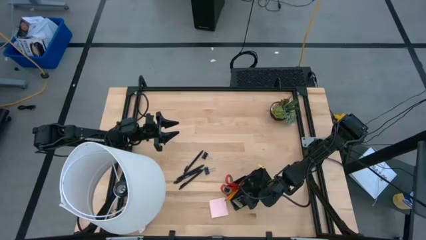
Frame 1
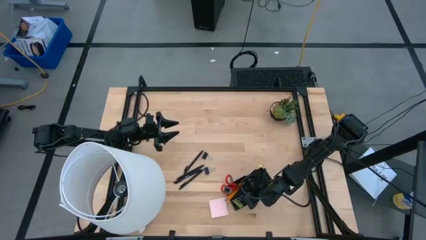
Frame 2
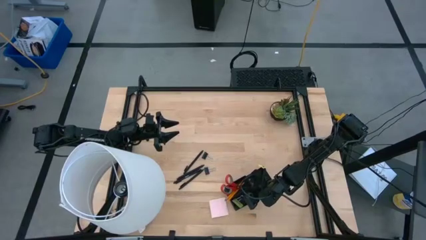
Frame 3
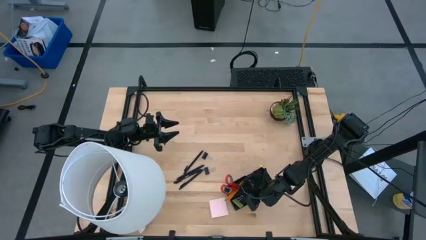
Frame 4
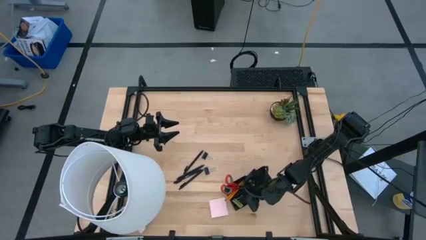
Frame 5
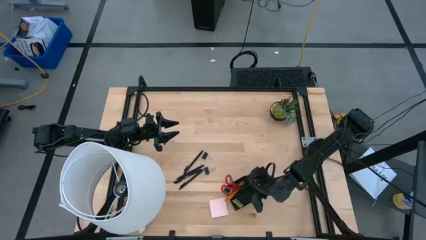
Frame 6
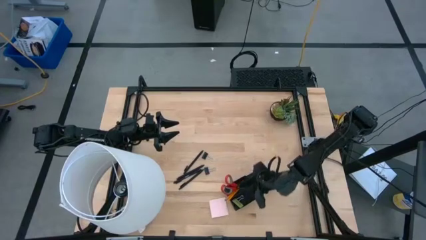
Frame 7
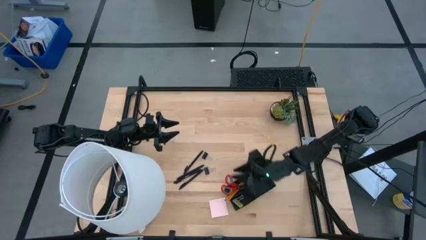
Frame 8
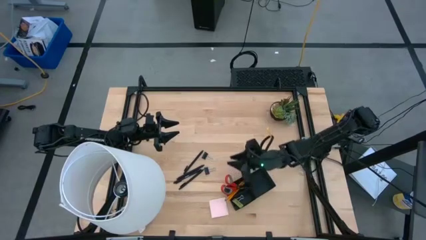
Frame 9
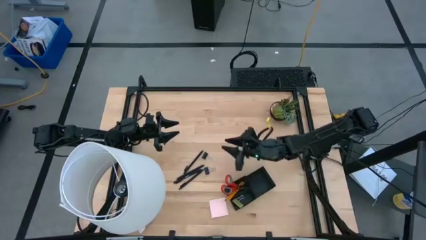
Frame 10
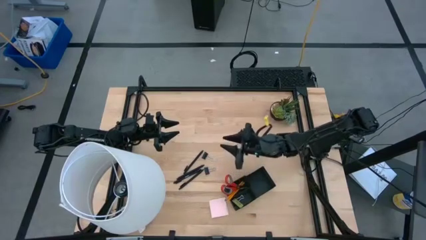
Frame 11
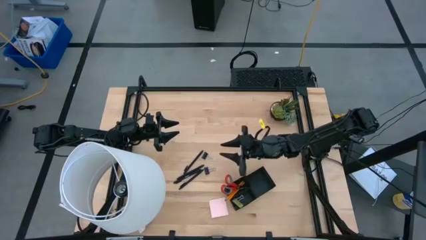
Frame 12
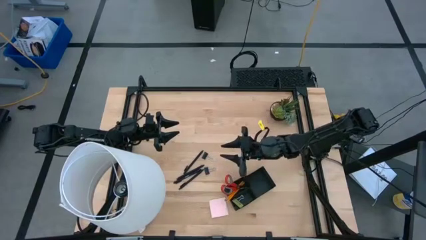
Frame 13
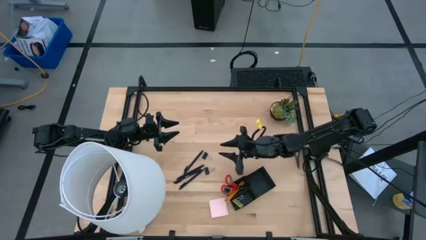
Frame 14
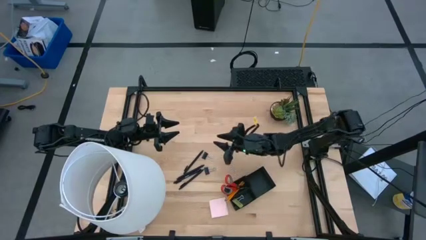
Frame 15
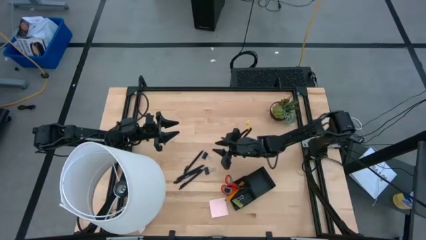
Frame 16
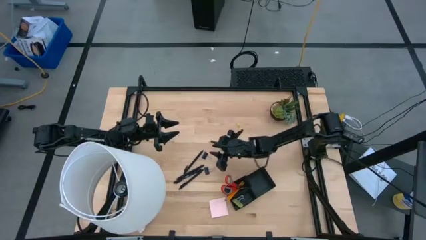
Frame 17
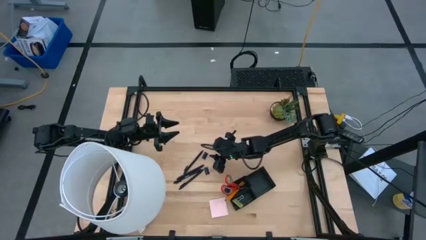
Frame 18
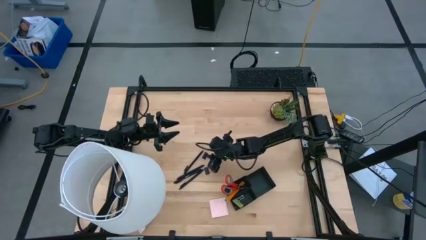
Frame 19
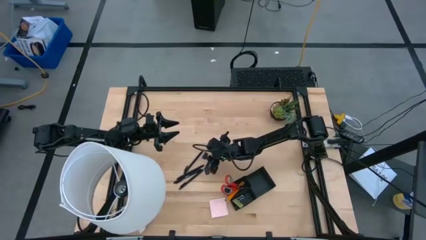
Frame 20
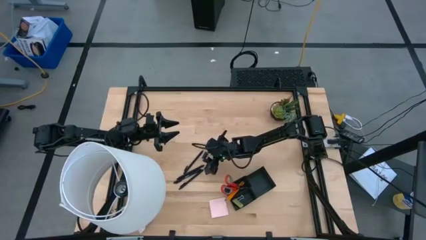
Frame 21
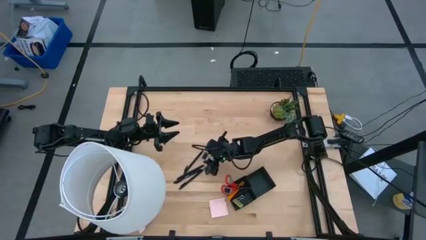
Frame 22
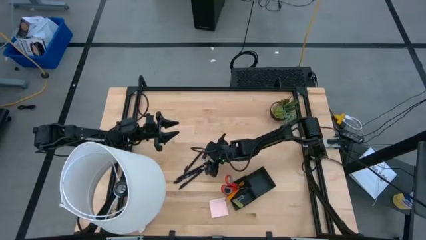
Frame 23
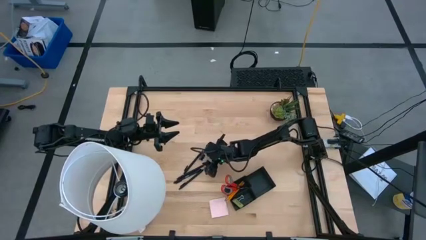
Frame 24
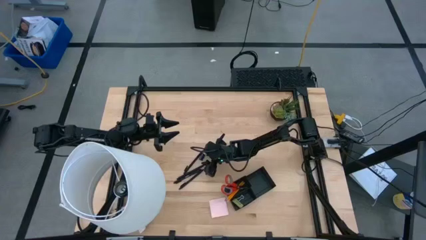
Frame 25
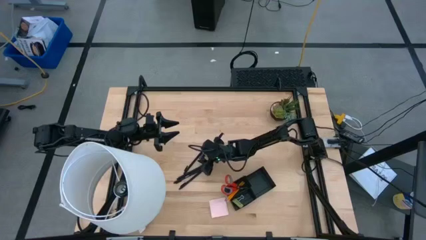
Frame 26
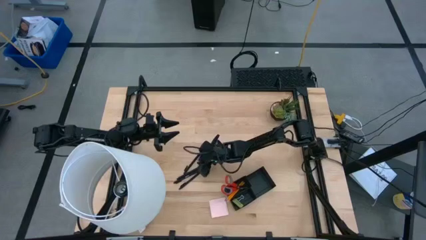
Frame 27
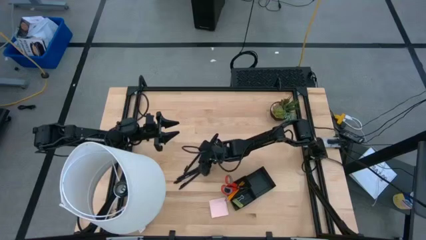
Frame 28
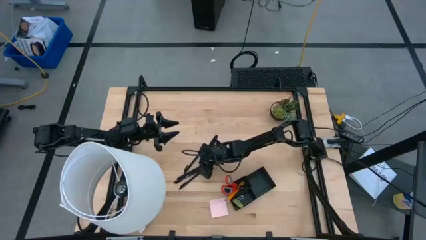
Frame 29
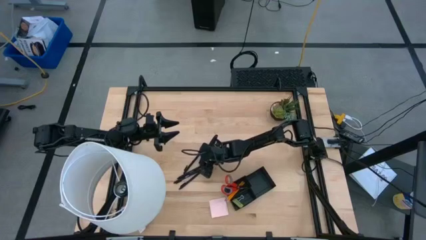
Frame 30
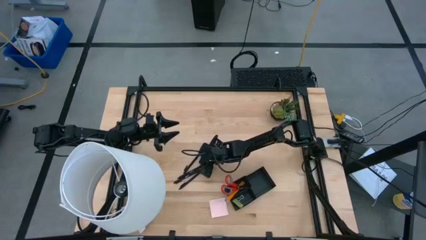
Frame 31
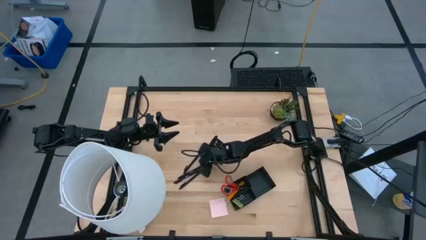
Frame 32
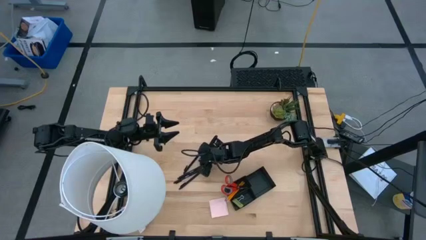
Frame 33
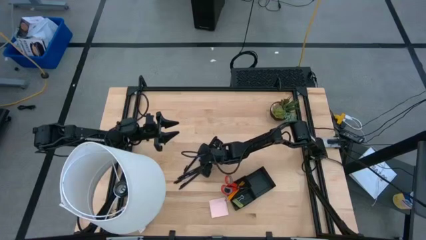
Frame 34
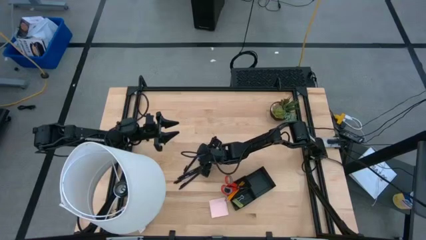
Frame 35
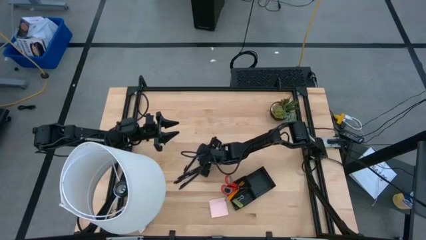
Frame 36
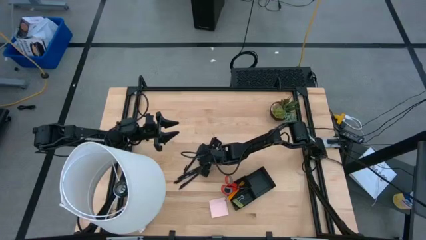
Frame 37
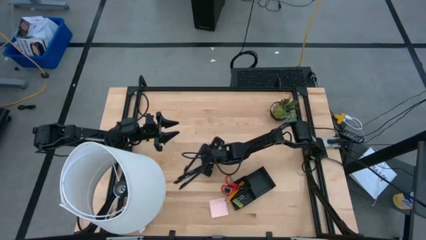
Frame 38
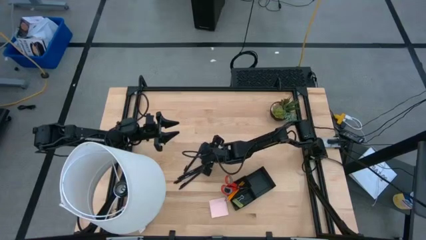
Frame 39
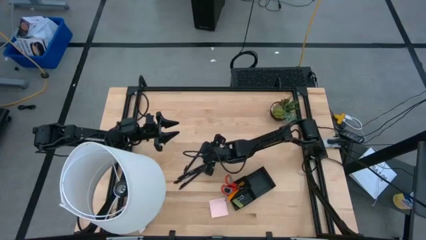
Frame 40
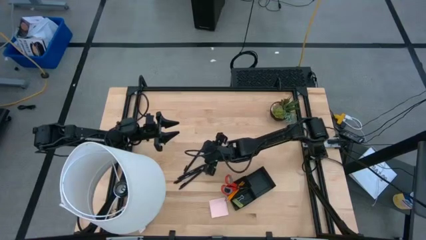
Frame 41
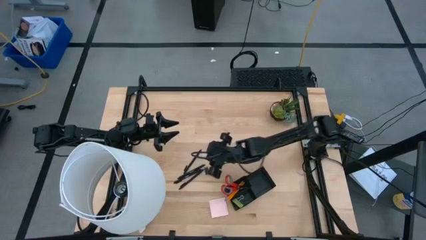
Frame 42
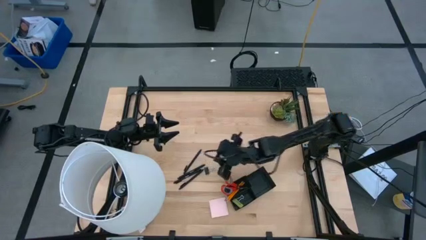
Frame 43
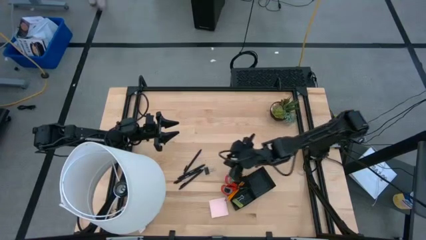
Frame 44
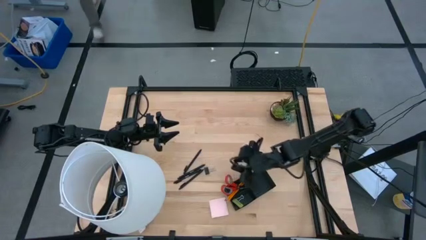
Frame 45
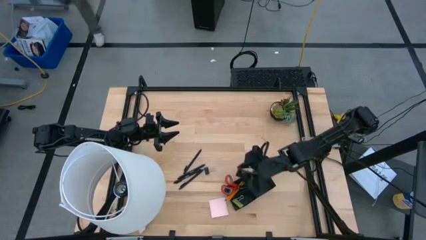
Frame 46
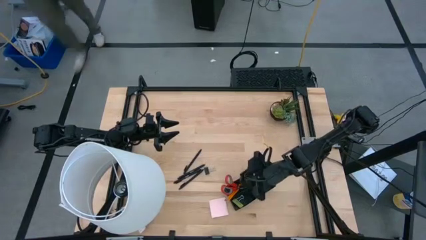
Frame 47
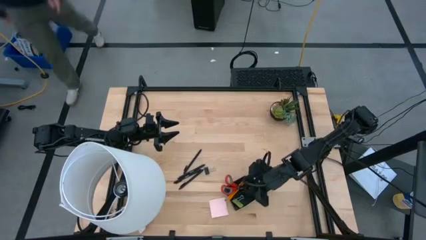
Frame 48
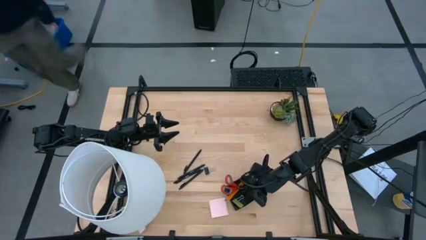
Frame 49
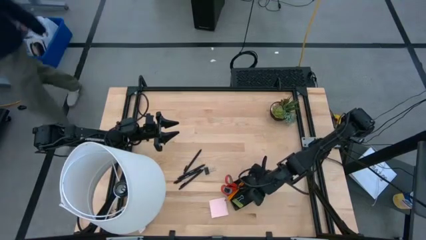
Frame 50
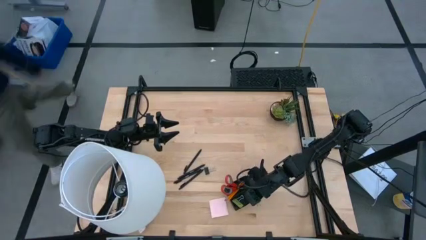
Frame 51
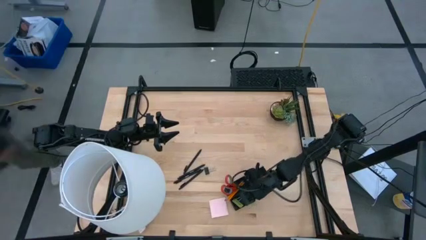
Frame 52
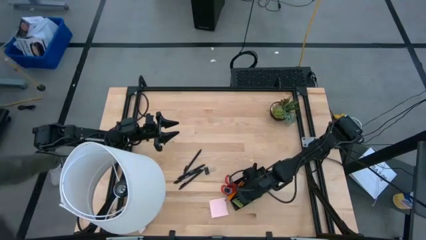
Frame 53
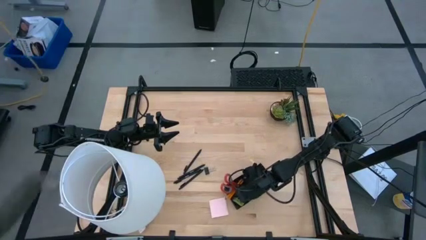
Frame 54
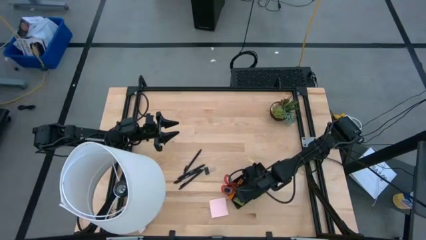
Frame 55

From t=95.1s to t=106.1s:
Task: Pick and place office supplies into organizer
Put the black binder clip into the black desk organizer

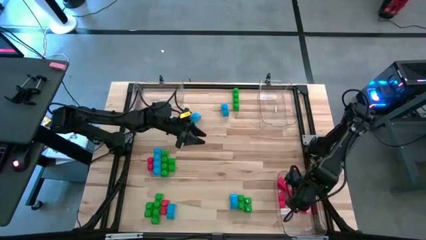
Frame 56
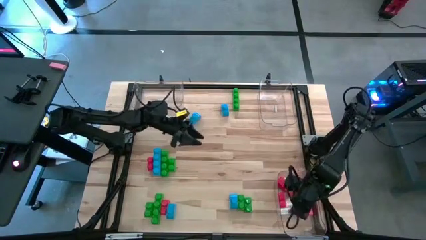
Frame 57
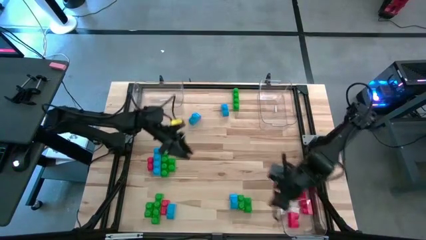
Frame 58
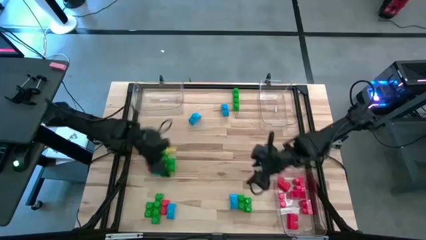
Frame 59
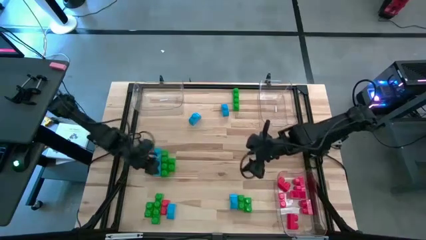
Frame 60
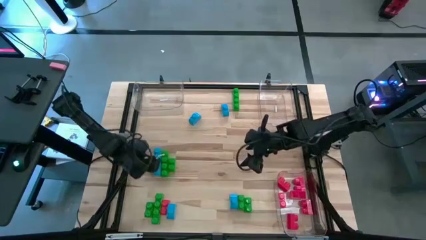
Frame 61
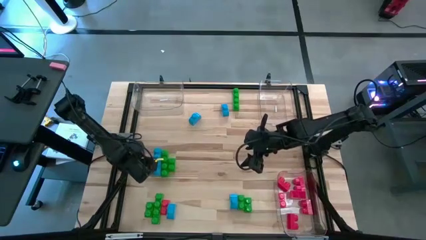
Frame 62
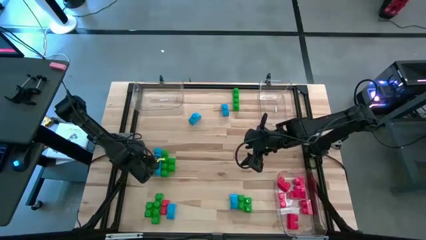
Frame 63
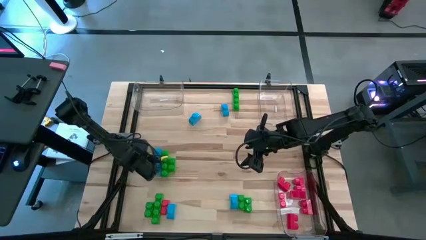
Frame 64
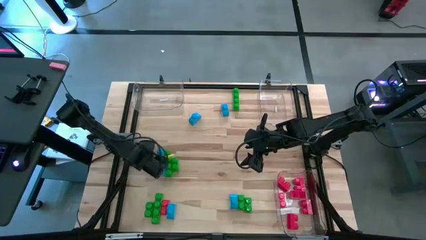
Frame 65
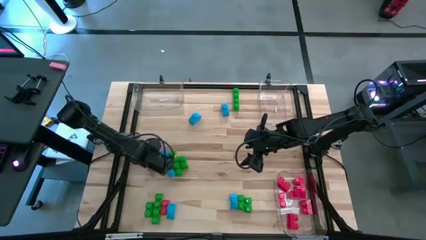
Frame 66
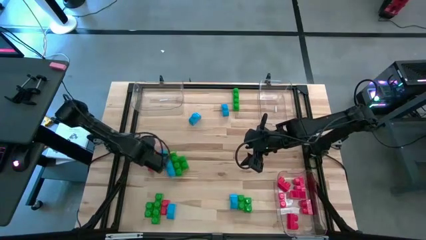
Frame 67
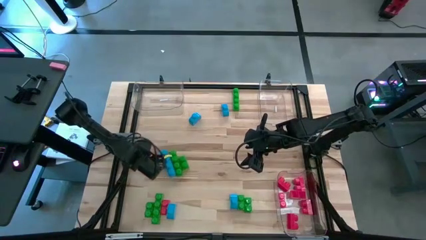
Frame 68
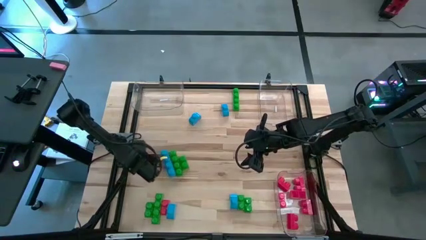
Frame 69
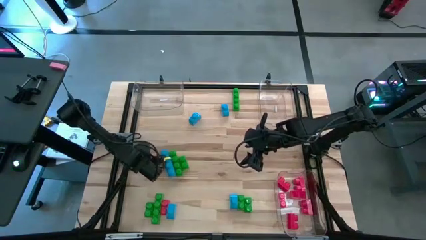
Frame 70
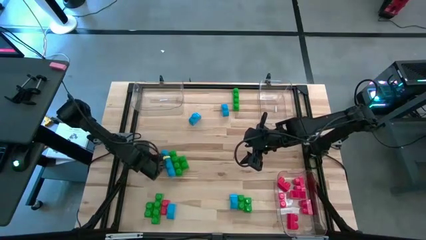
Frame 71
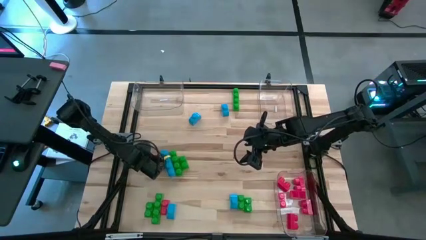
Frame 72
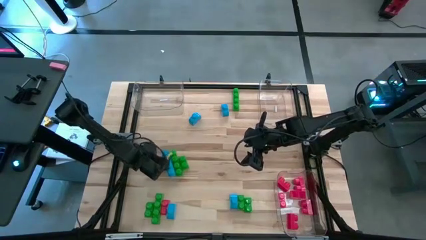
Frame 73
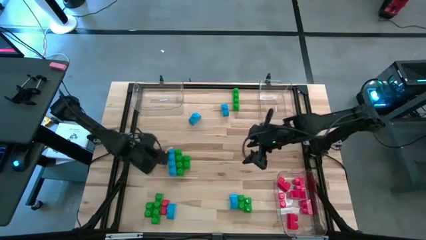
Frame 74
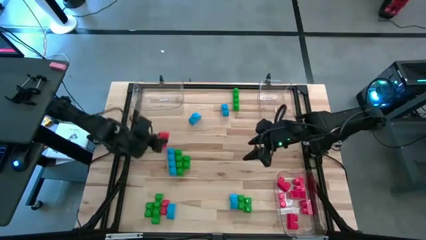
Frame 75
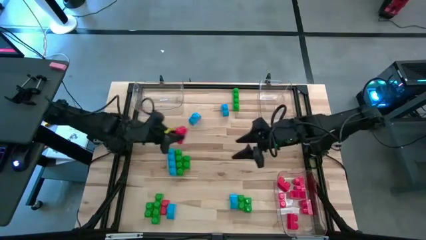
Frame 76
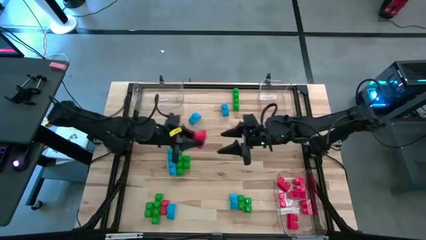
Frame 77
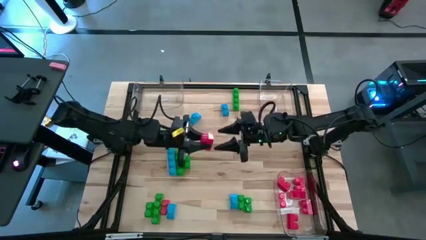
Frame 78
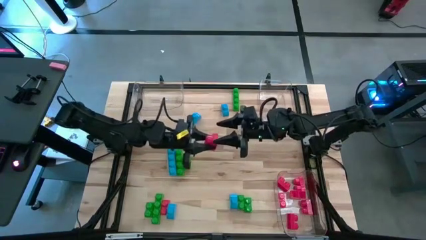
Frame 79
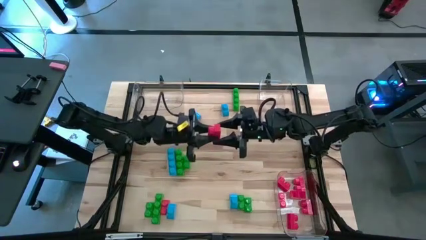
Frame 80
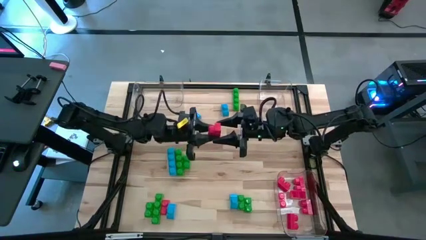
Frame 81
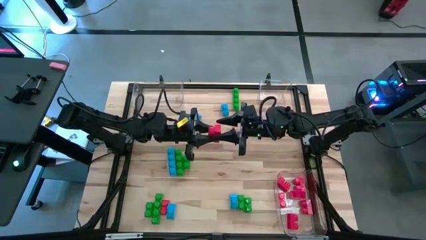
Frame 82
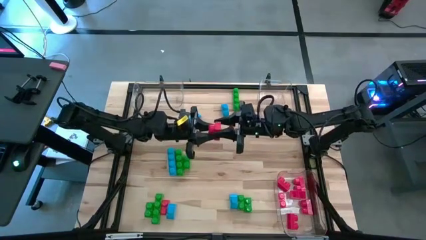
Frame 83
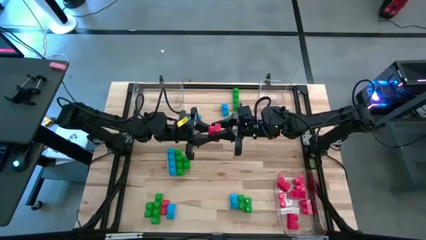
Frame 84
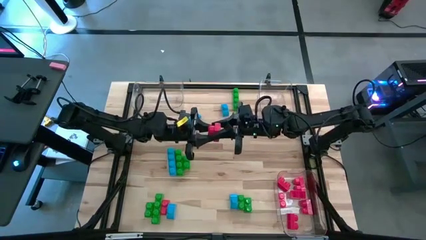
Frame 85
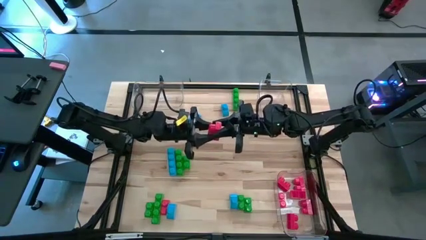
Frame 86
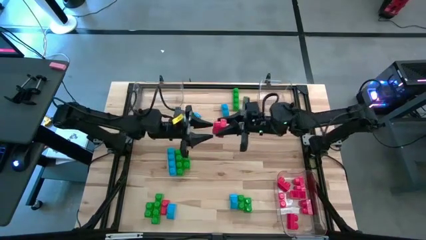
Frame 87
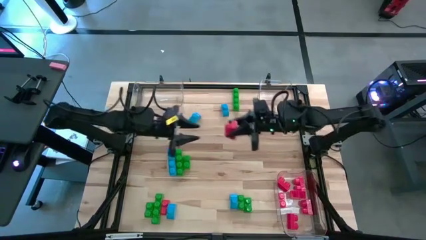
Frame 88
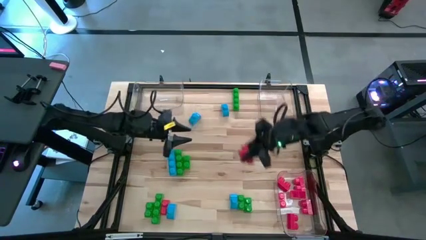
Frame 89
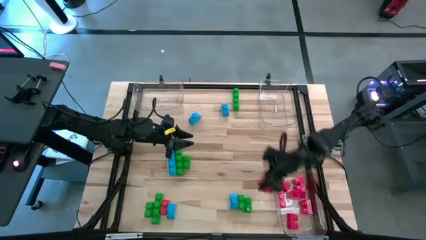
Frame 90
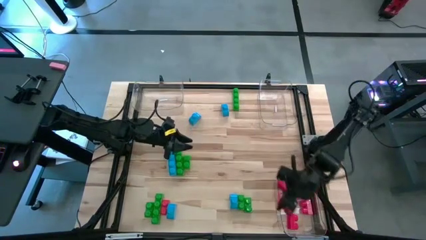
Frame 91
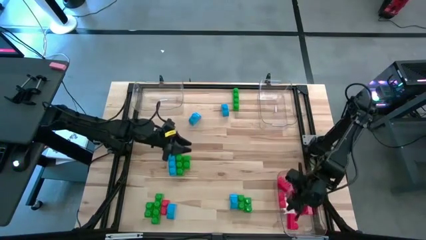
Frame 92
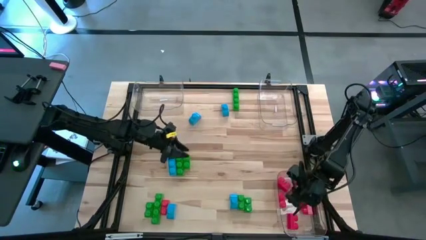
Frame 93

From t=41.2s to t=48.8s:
Task: Sort blocks
Put the red game piece into the bottom right transparent bin
